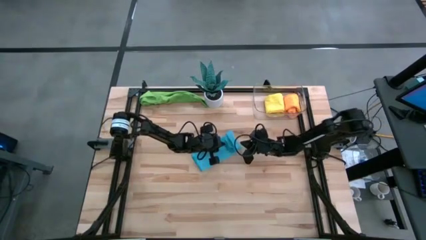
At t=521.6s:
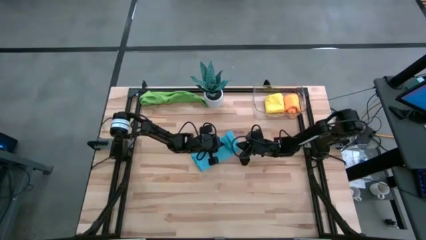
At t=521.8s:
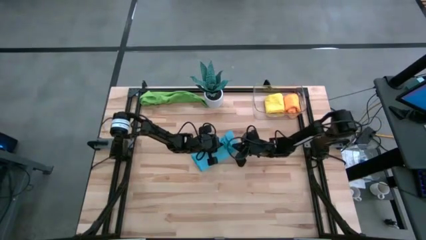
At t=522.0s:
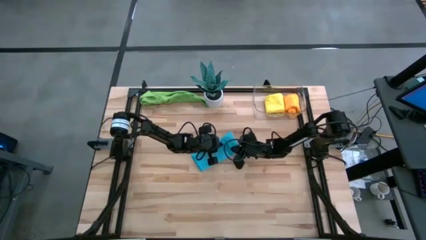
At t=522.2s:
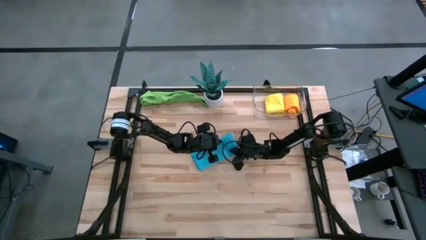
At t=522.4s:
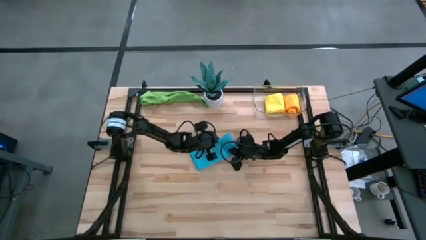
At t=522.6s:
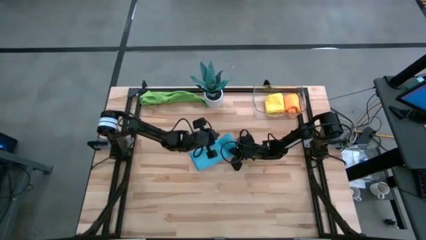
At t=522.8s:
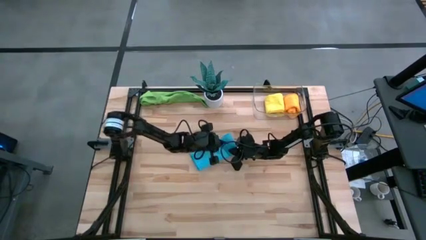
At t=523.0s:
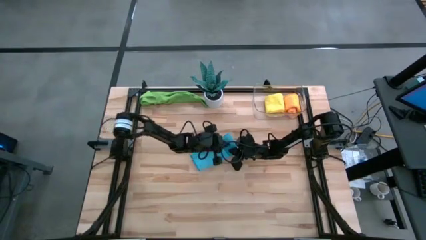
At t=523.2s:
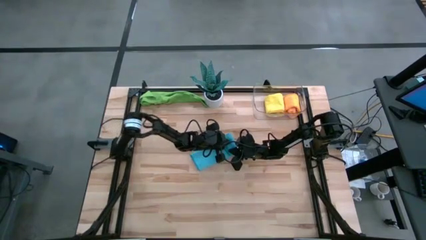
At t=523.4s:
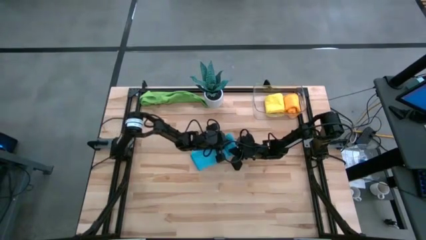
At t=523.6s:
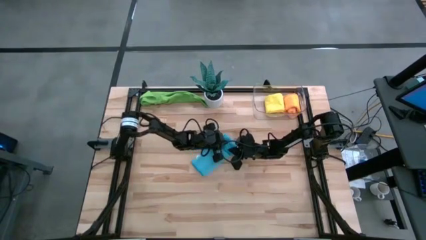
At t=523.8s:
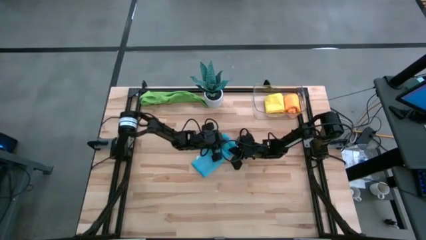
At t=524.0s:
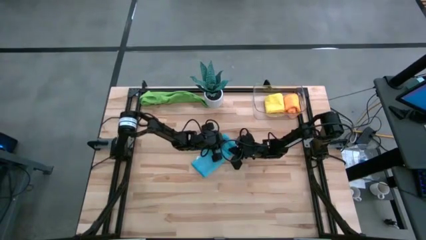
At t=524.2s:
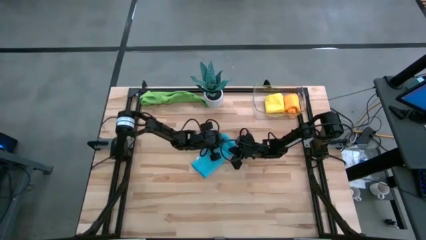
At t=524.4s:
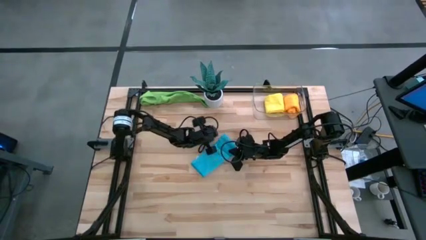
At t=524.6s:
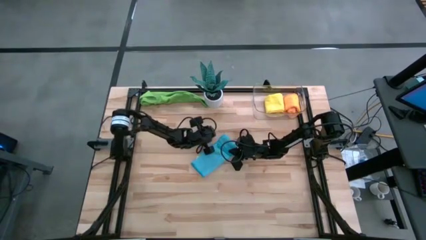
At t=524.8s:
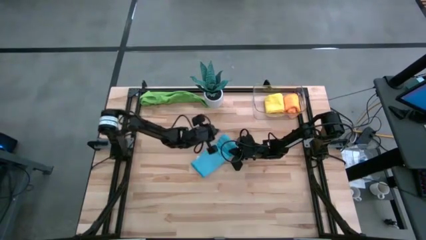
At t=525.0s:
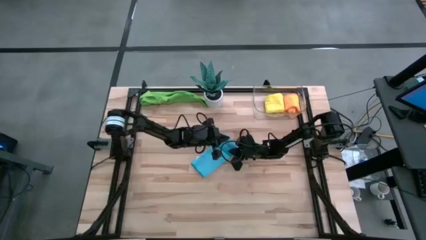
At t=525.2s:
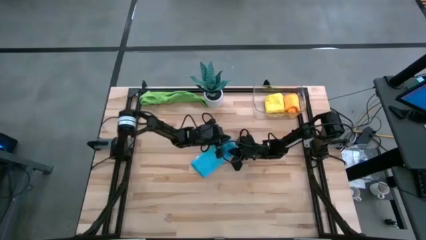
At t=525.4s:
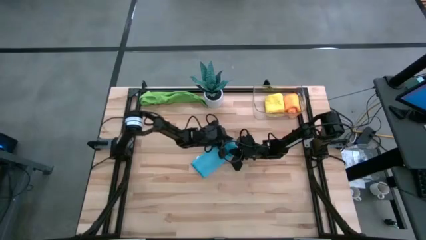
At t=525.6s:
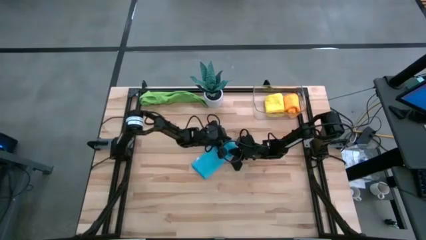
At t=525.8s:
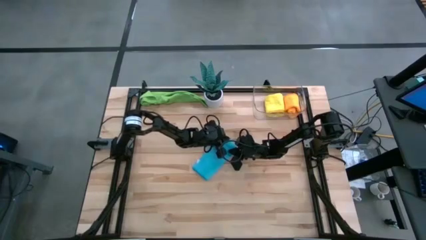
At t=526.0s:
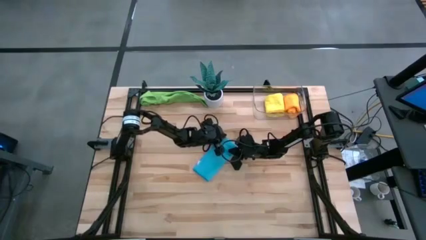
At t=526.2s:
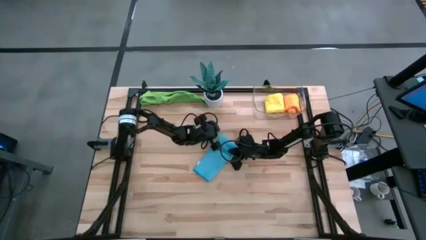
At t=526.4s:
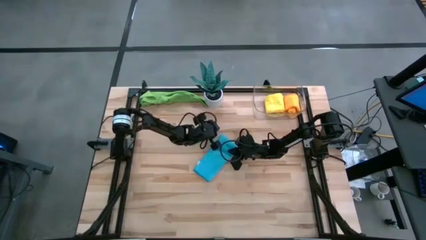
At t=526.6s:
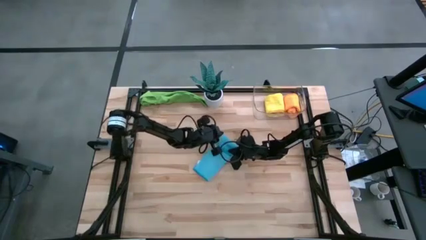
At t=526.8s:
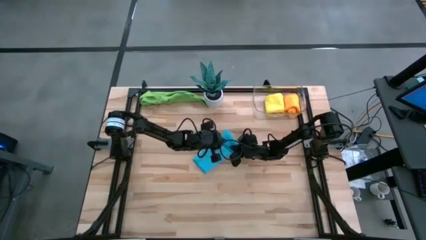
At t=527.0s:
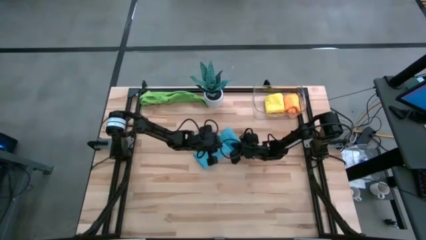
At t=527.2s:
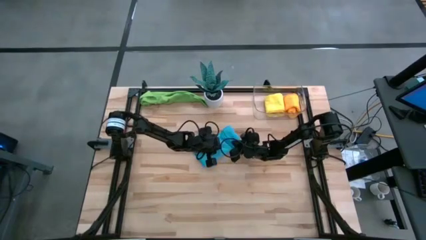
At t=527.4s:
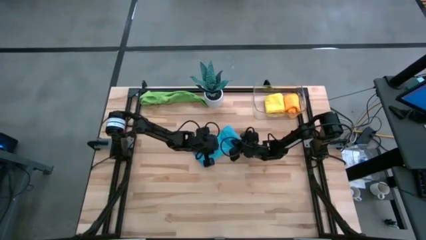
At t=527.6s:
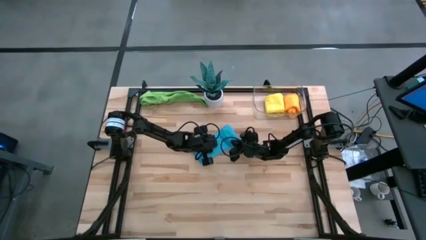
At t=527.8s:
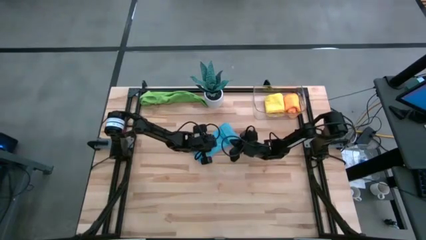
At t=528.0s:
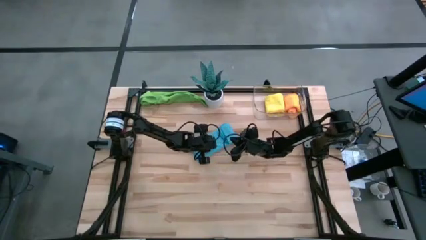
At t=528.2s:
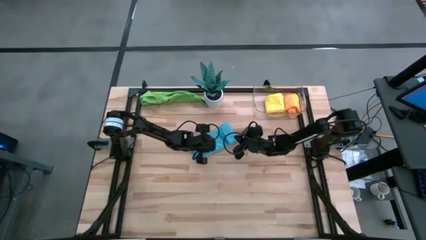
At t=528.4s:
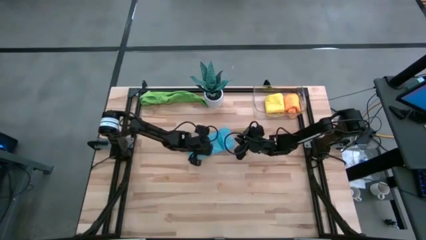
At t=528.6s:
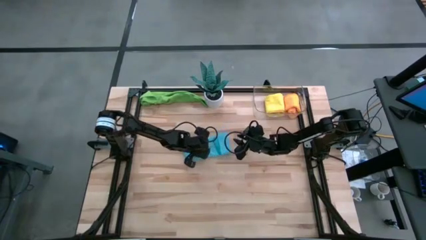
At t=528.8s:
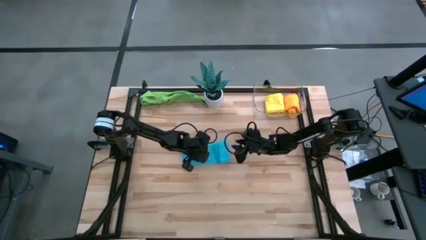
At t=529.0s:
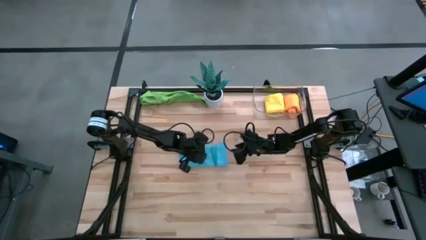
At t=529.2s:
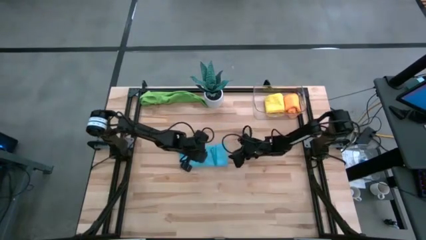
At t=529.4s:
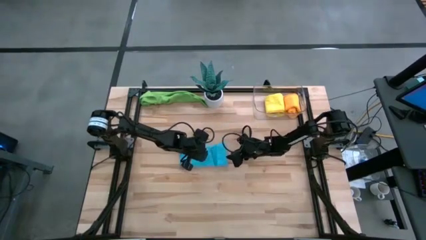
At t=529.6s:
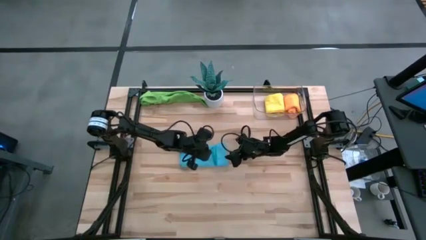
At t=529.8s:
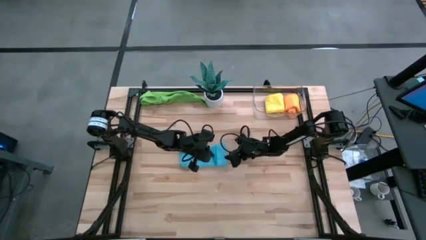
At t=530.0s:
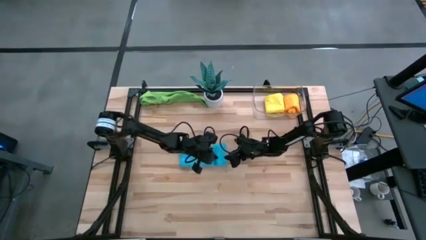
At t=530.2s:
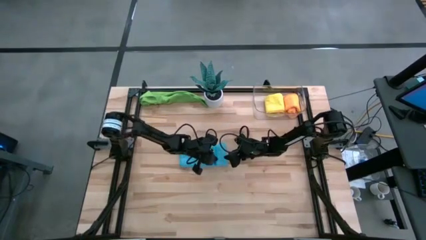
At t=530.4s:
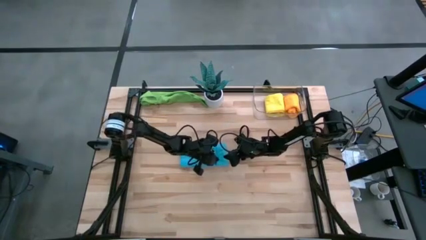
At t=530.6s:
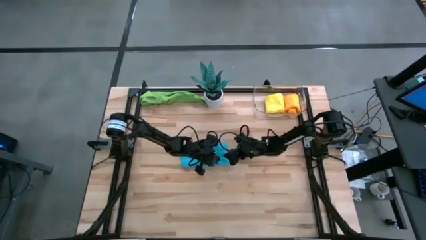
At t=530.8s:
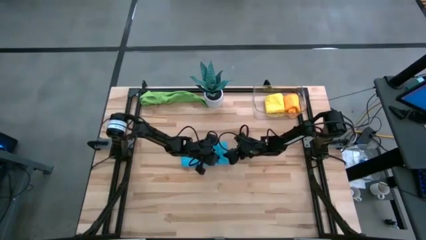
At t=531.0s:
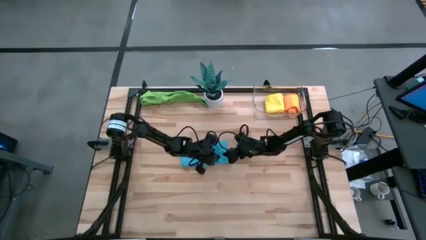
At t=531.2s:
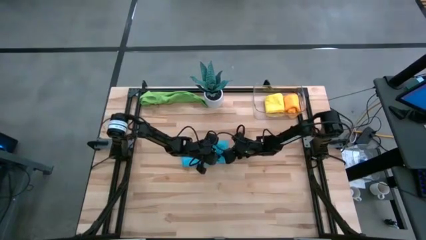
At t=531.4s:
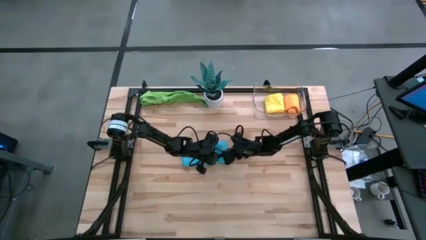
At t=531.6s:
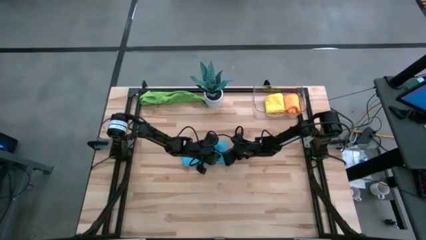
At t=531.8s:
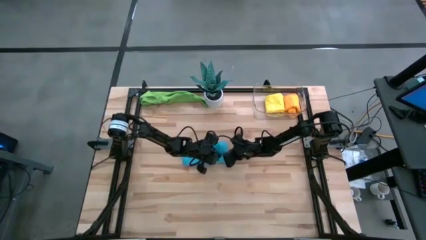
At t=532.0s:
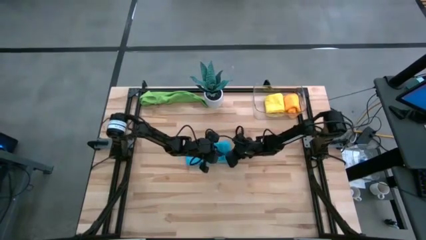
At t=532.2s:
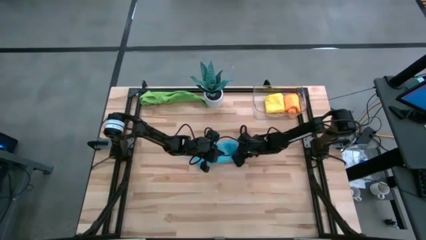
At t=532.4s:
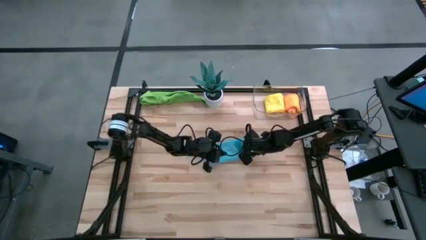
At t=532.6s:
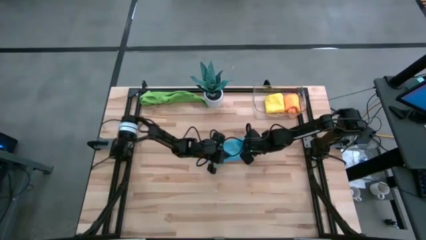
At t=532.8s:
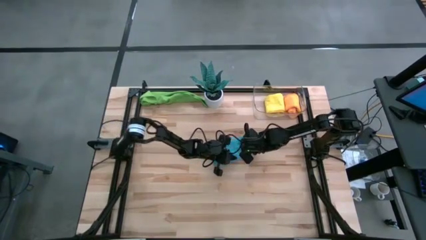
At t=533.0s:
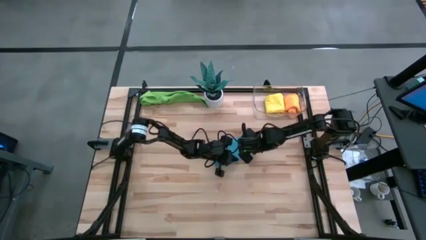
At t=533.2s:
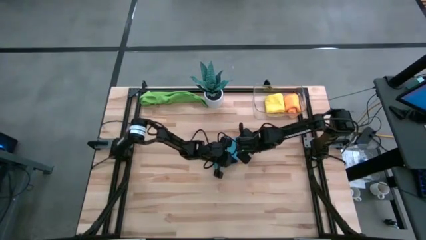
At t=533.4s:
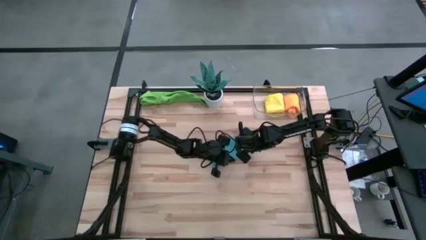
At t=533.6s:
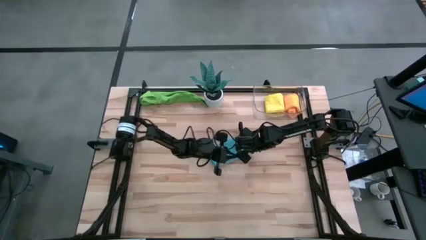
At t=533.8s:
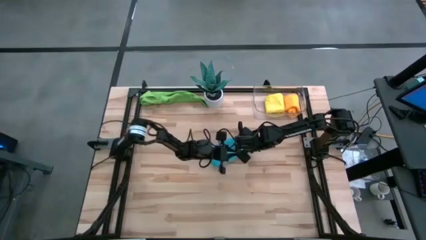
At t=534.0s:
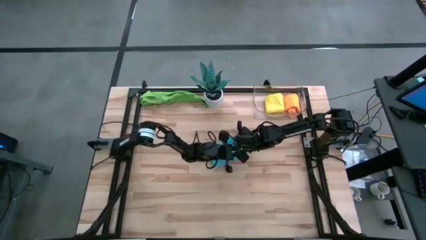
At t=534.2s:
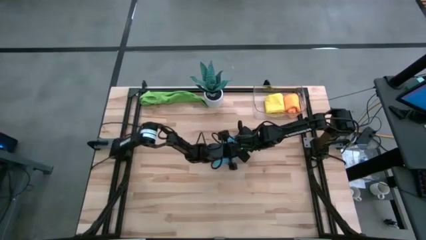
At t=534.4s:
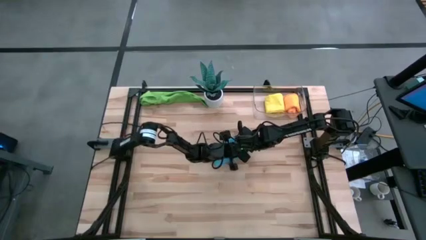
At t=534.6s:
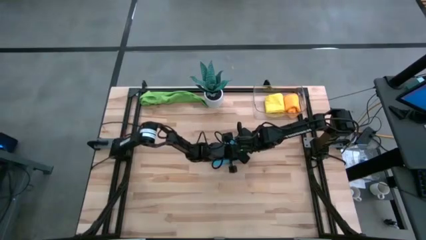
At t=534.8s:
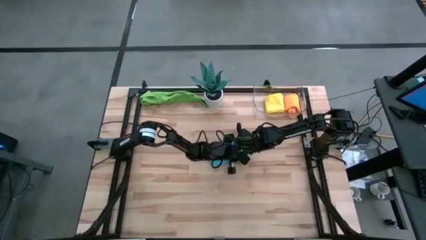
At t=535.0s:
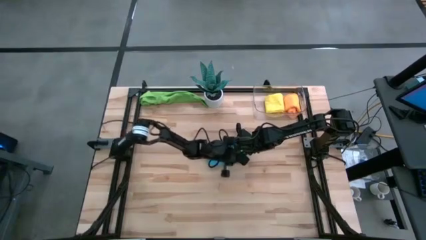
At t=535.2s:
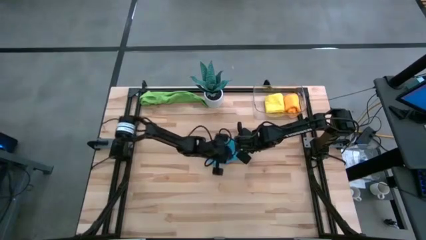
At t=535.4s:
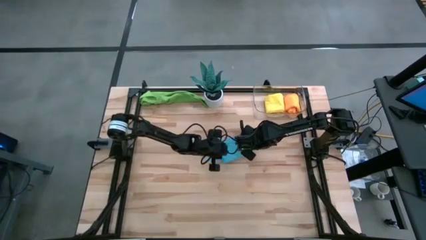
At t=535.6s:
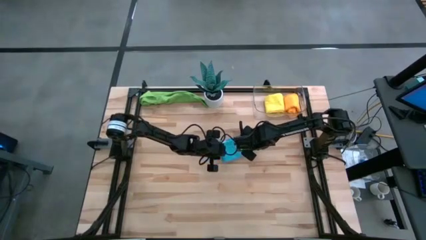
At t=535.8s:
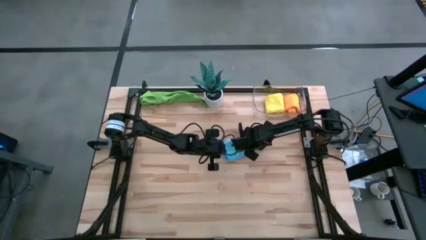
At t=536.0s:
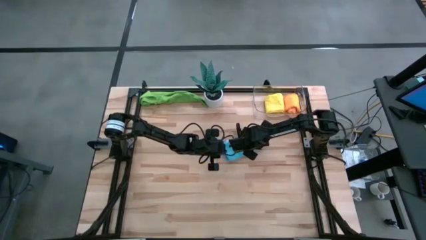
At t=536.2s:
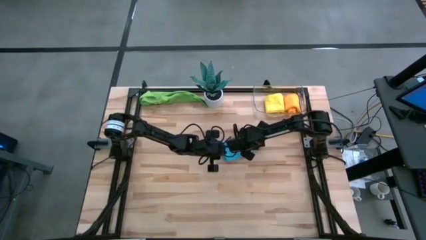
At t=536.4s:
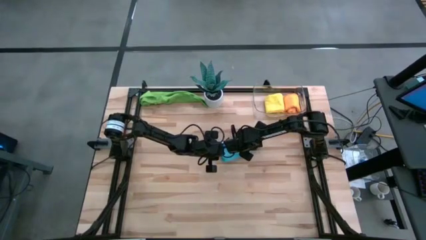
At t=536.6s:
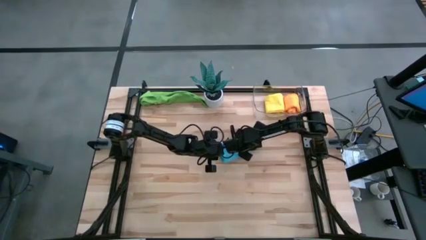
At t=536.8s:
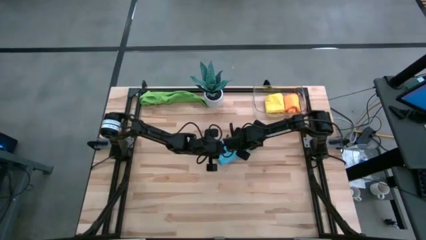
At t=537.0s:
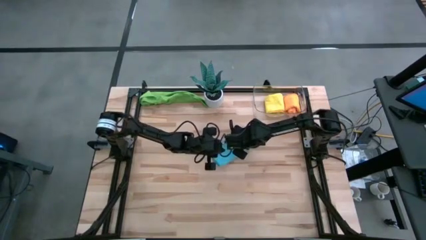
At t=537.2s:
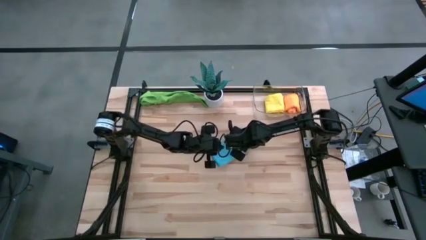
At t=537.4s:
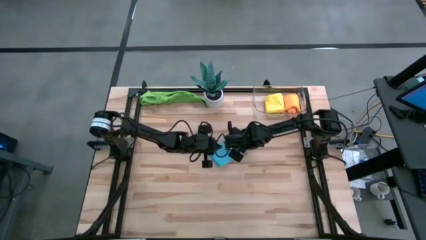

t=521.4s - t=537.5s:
Task: Roll microfiber towels into tight, uniform cylinder then place into a basket
Roll the blue microfiber cloth
